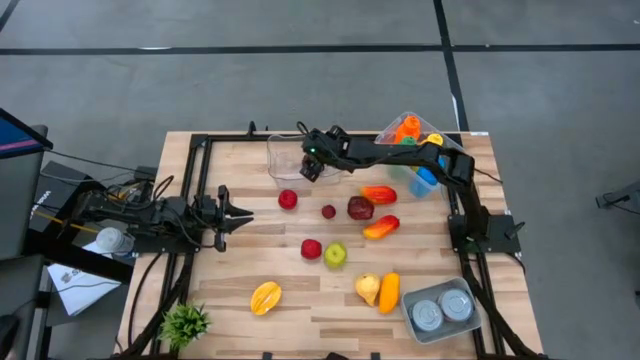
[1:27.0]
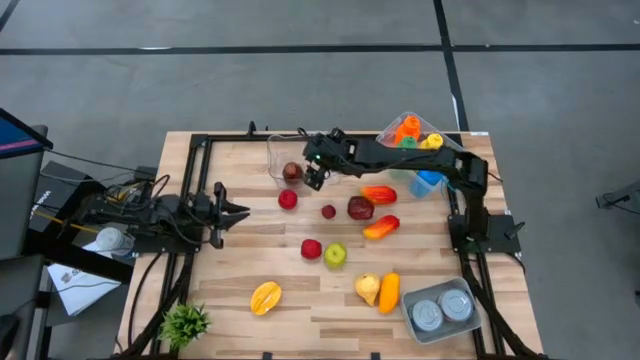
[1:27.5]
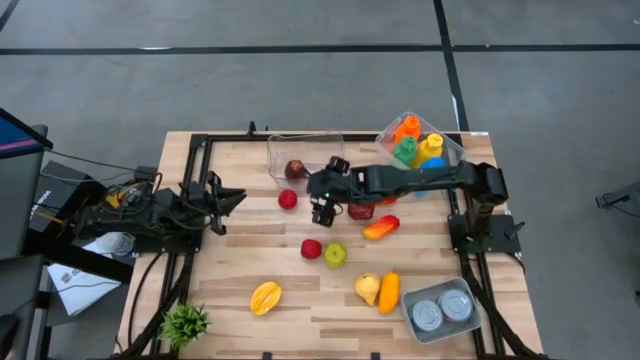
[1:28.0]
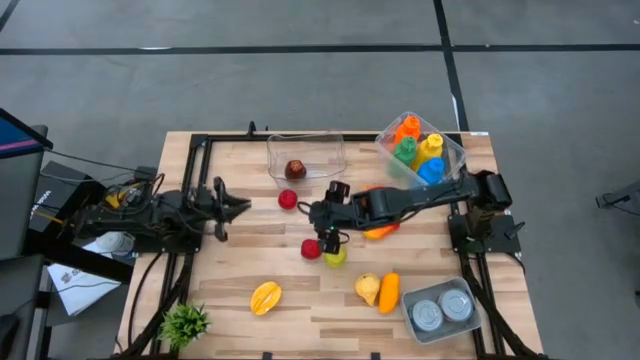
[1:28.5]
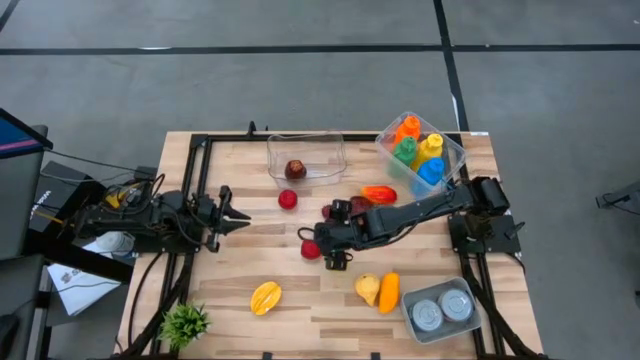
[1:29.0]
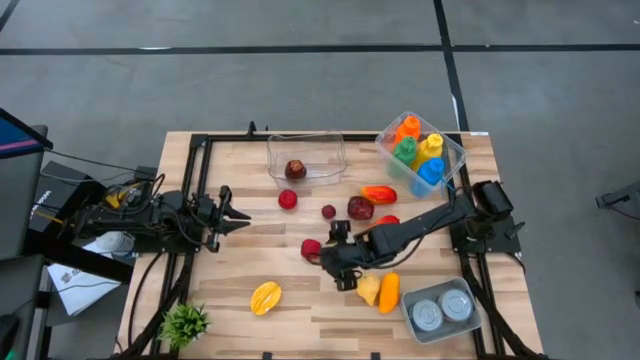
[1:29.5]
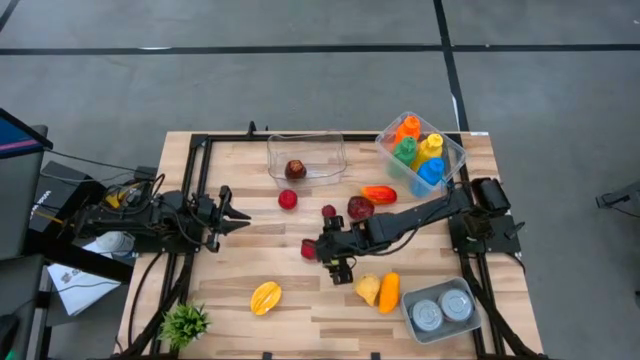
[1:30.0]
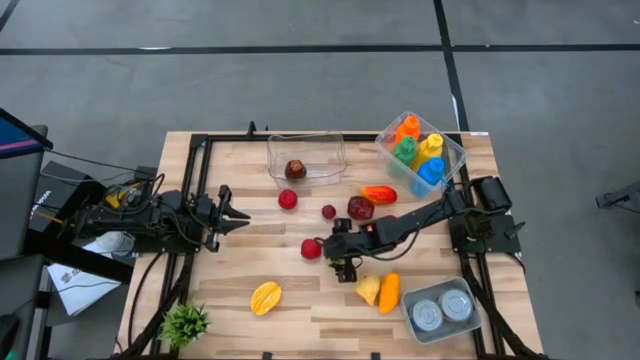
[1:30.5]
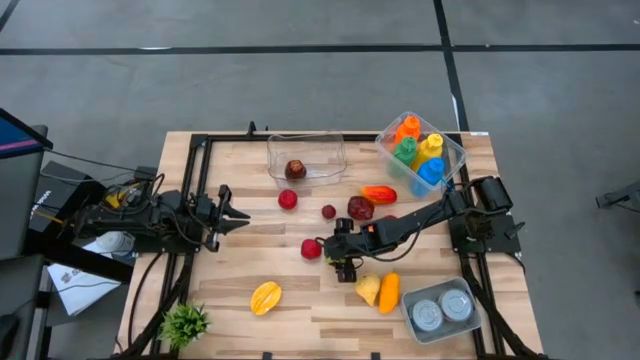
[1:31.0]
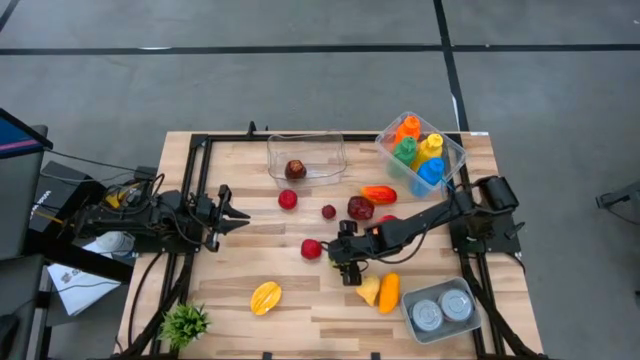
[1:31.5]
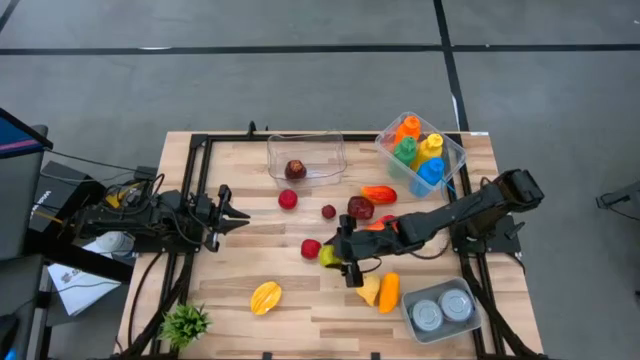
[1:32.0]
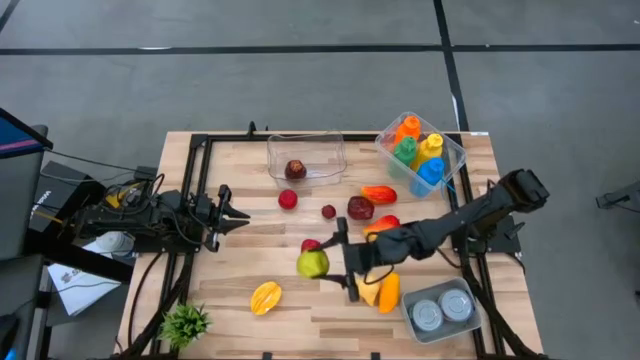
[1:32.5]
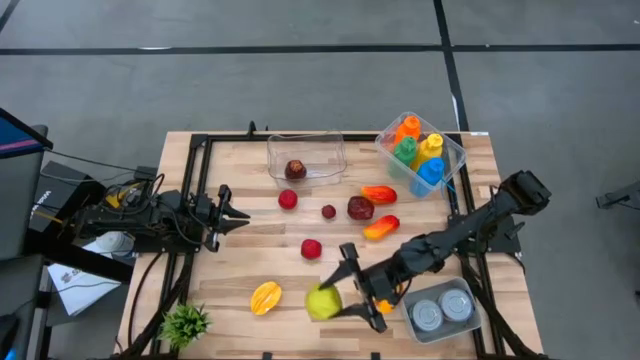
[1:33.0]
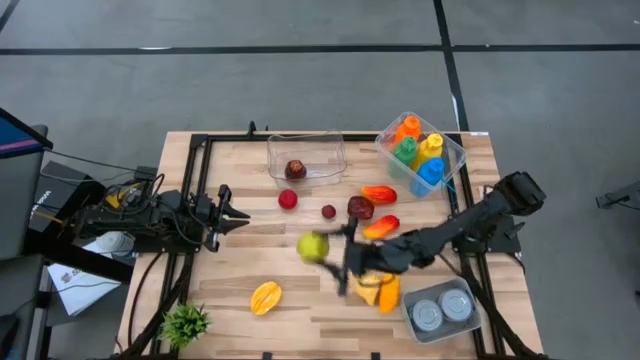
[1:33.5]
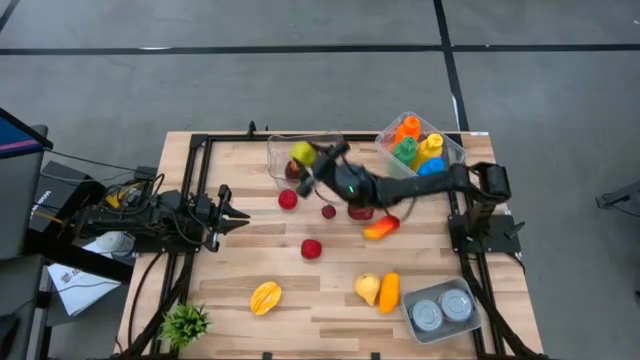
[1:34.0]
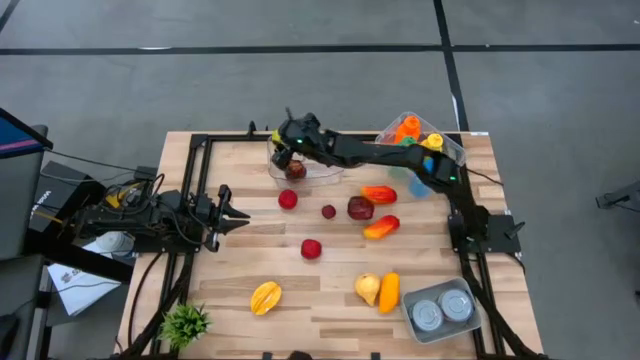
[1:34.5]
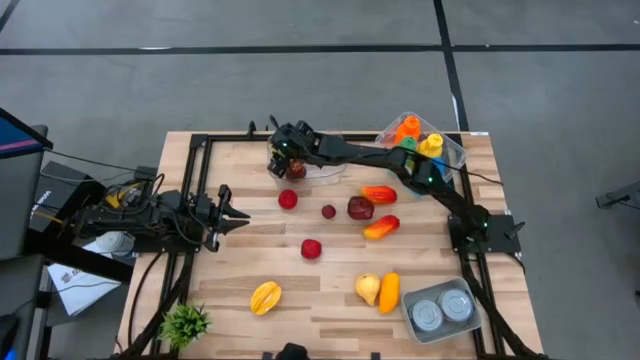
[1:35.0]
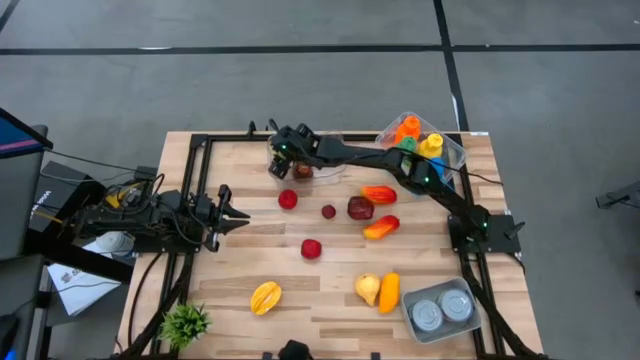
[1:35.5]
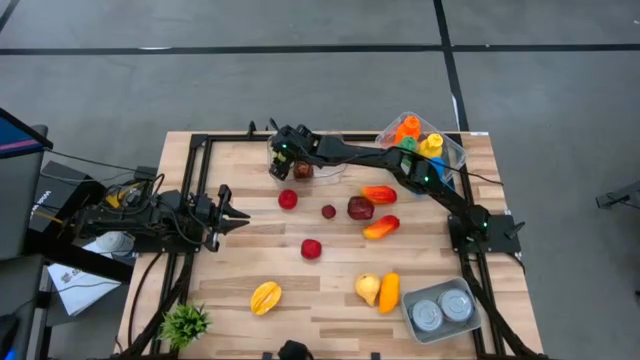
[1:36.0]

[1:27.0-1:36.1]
Task: Pick & Place Food Item
Put the green apple into the transparent bin

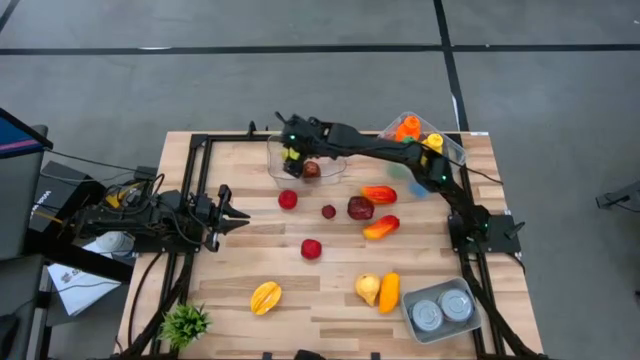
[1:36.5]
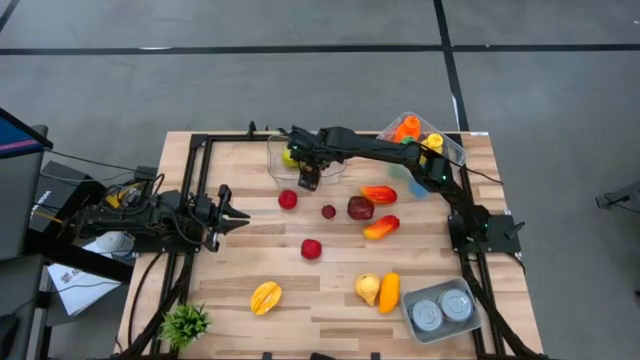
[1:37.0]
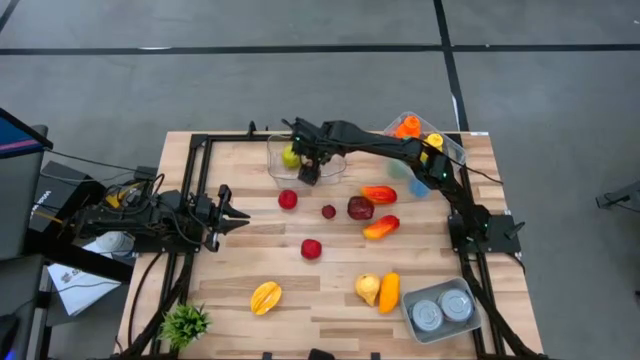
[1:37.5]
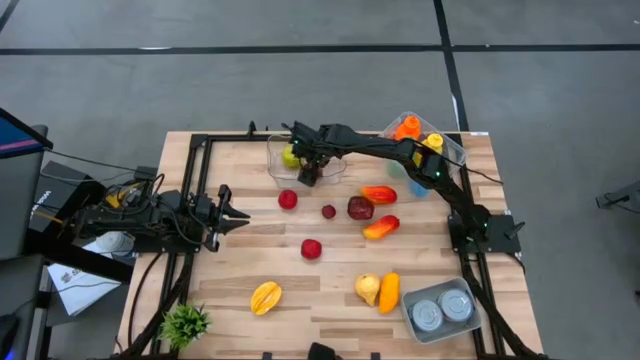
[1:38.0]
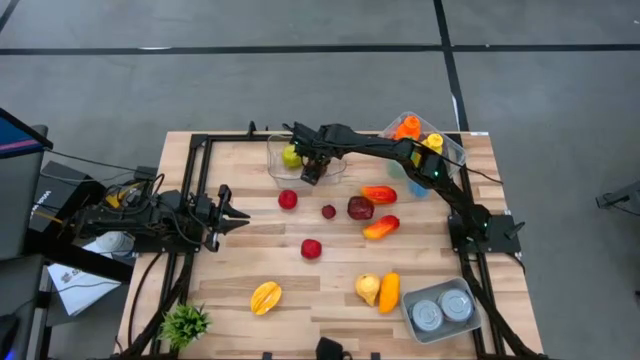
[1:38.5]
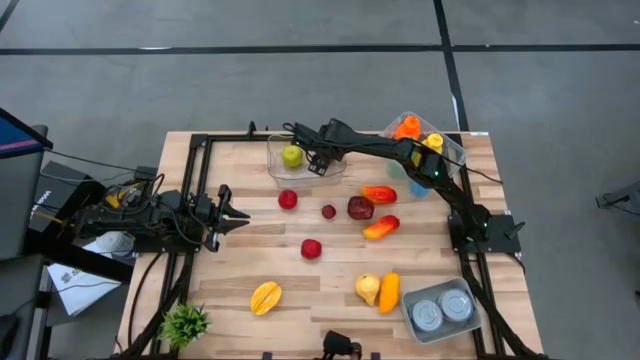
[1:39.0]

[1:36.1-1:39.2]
Adjust the red apple in the transparent bin

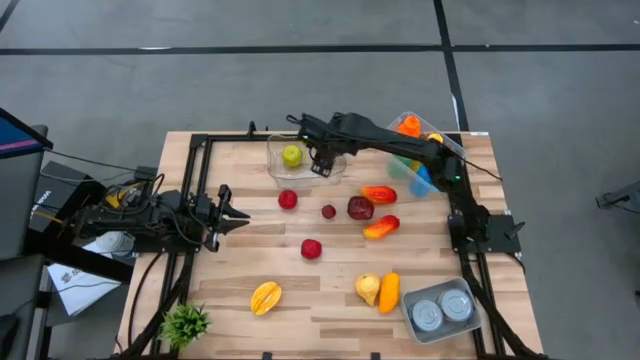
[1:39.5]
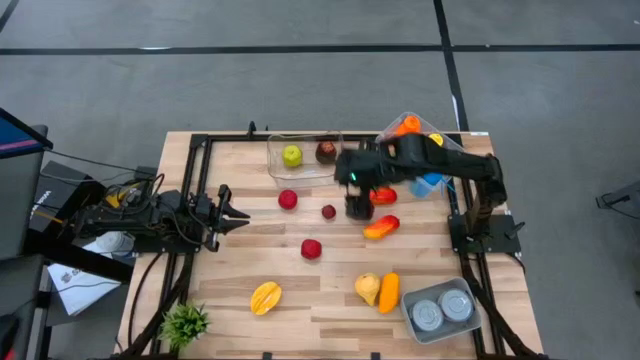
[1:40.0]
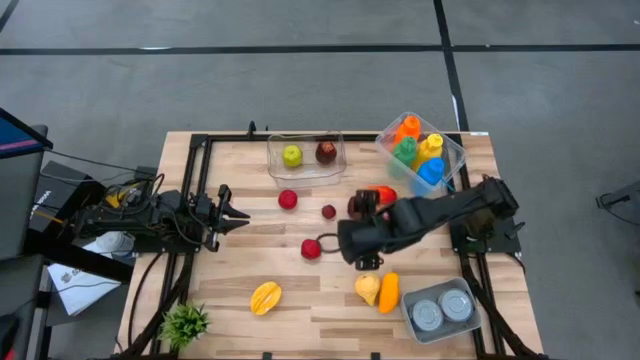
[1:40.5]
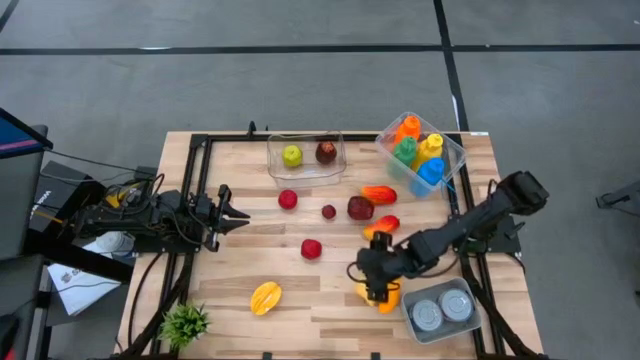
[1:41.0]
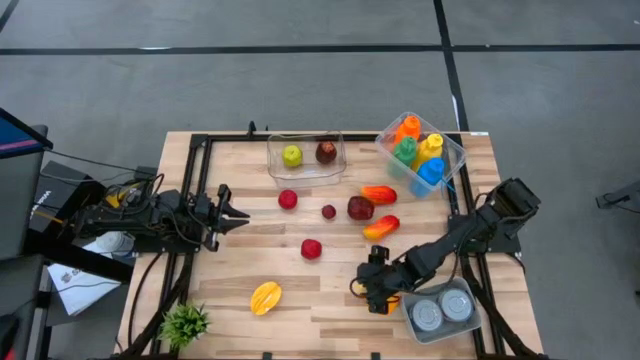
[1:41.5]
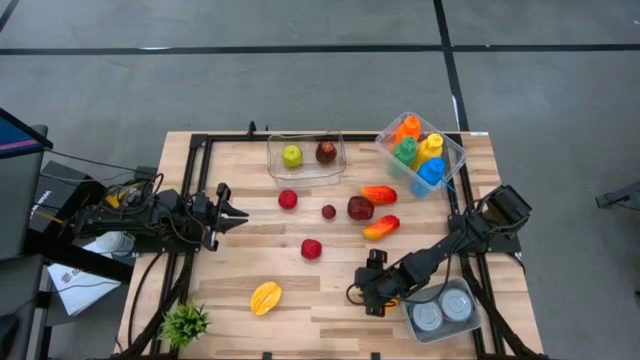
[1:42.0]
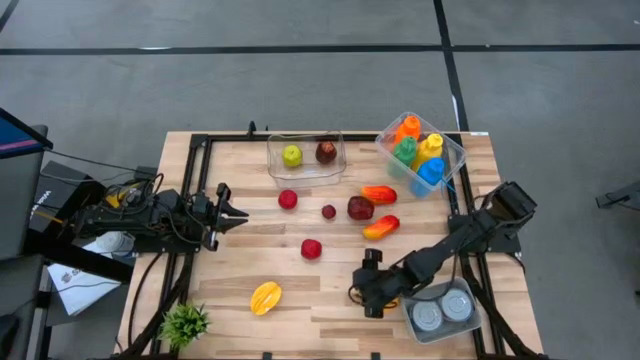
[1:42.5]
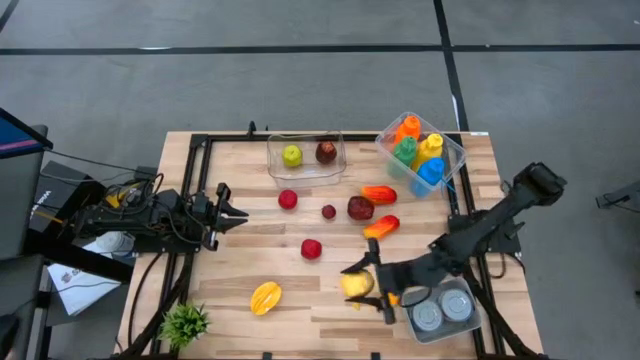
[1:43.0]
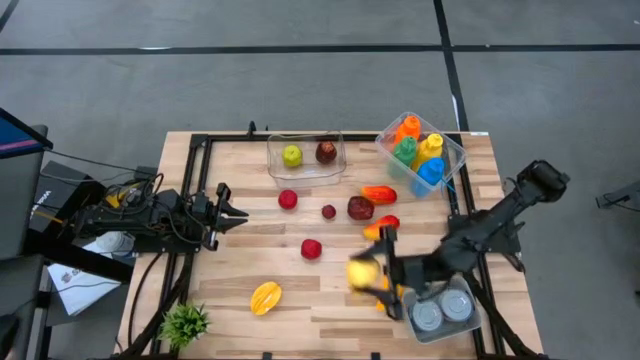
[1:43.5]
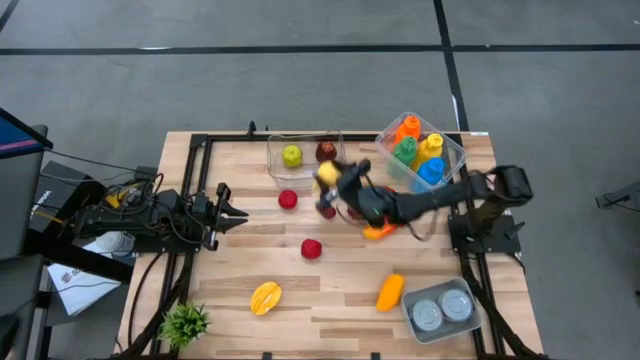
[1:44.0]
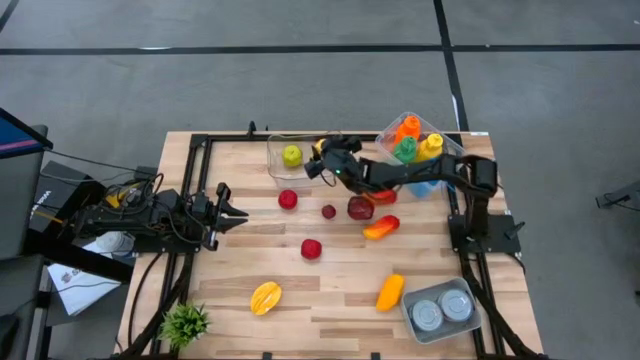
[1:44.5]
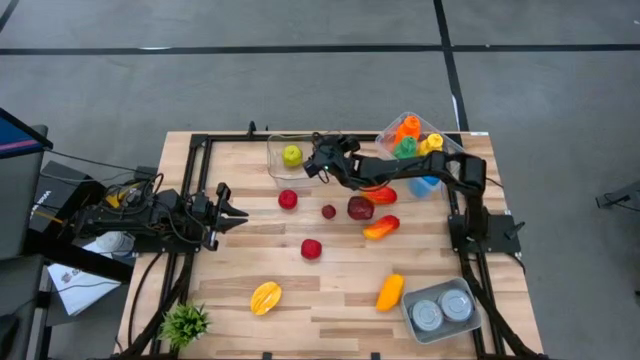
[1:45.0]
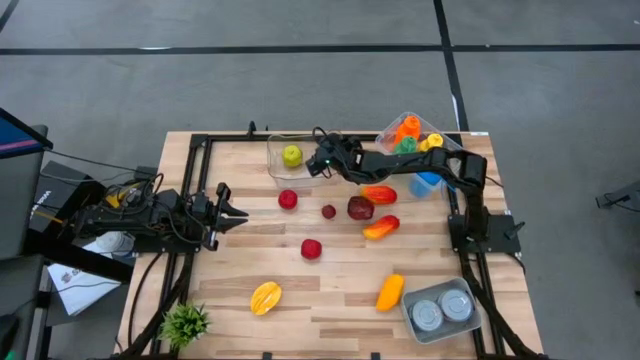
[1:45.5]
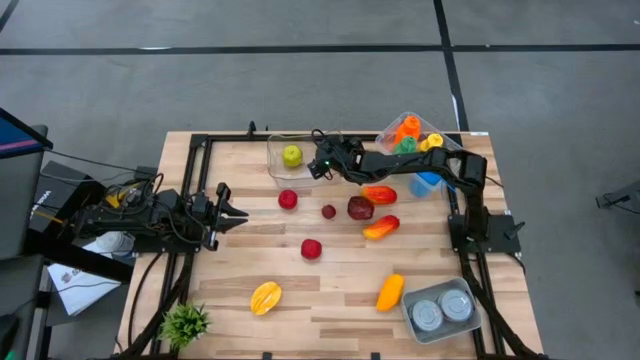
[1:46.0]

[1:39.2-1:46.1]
Put the yellow pear into the transparent bin

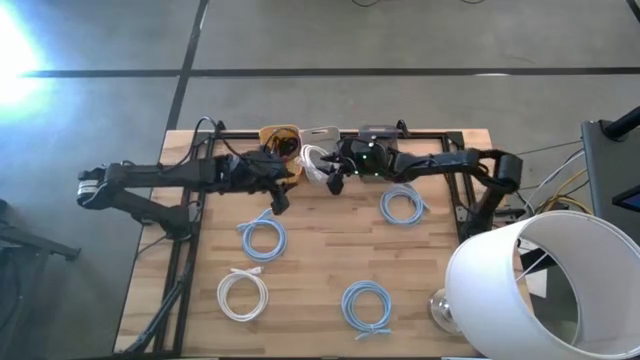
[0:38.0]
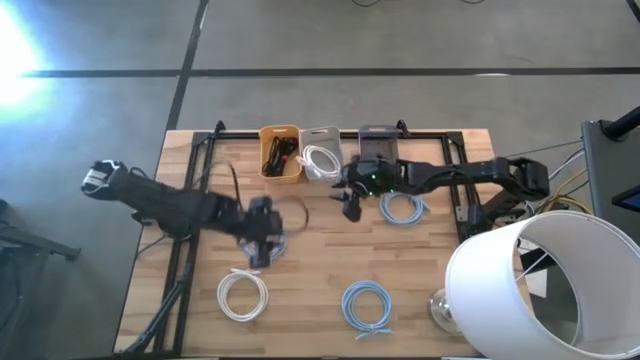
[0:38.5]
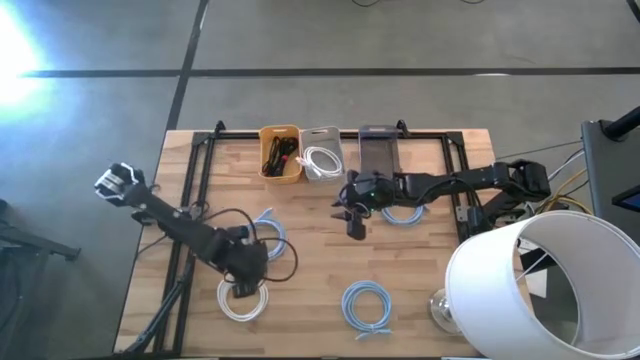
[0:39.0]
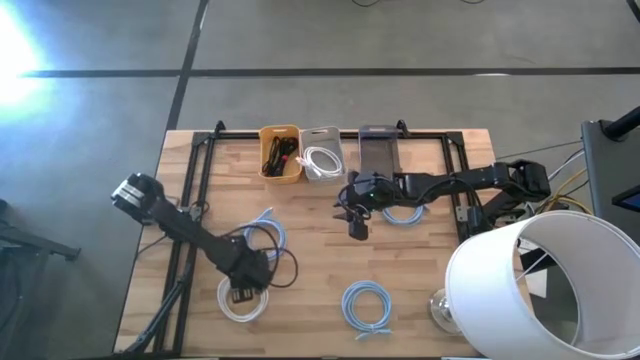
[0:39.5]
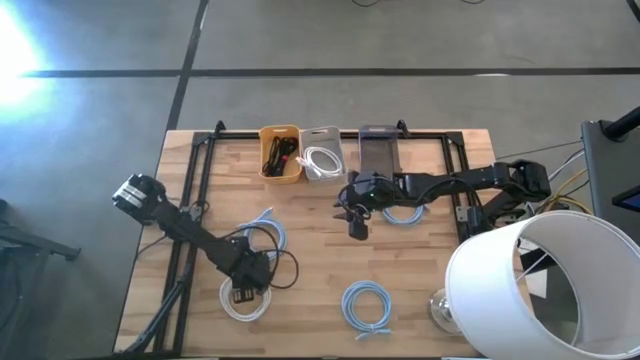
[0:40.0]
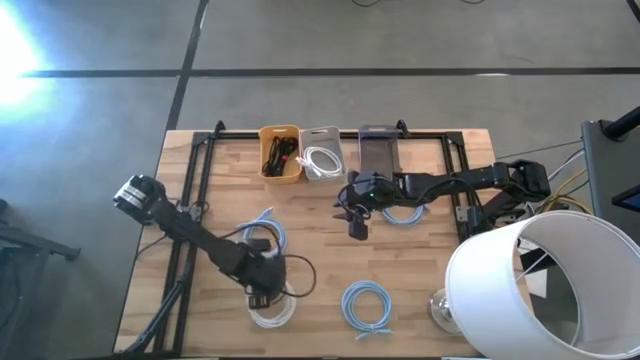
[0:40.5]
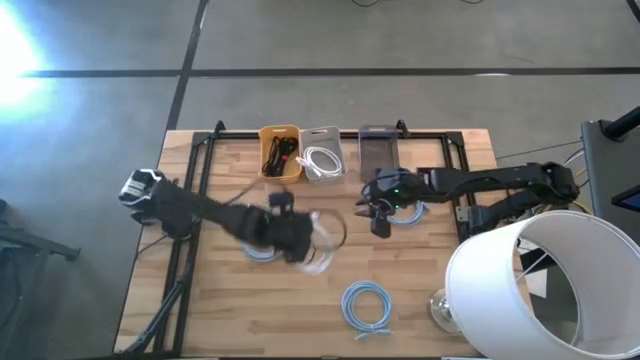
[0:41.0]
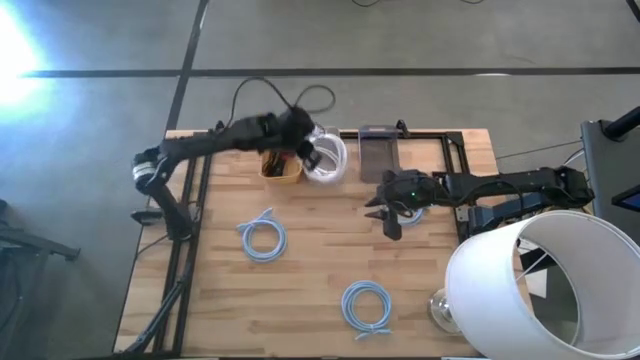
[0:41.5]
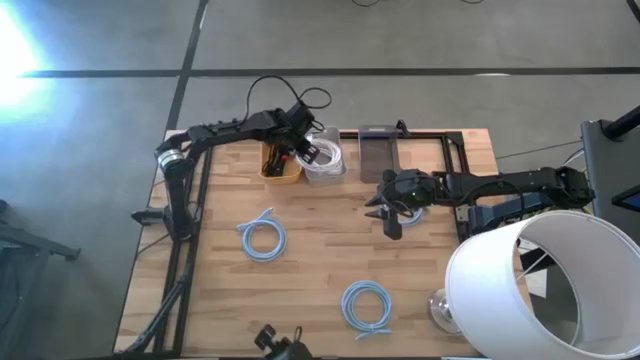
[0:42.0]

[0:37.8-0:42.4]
Task: Pick & Place USB Port
Put the white display cable into the gray bin
